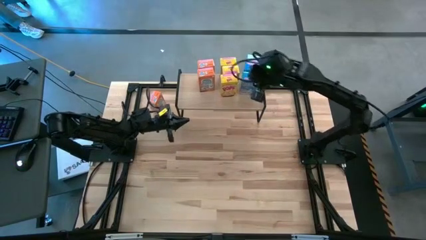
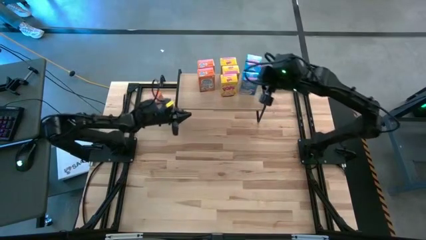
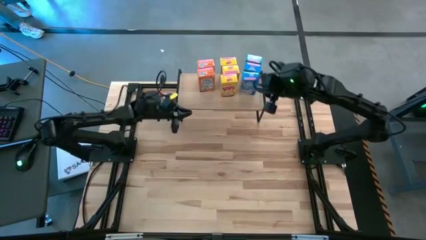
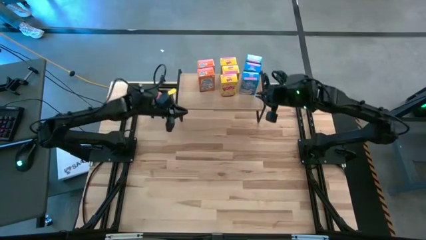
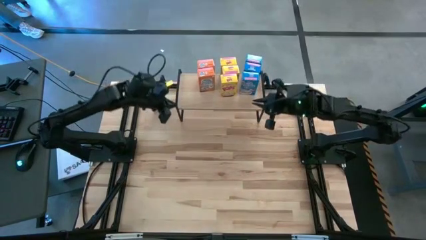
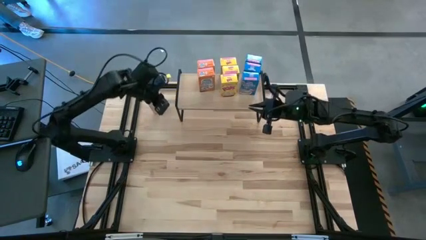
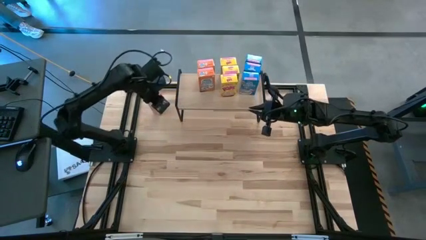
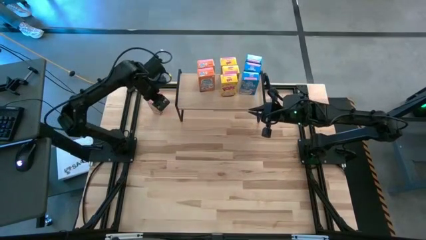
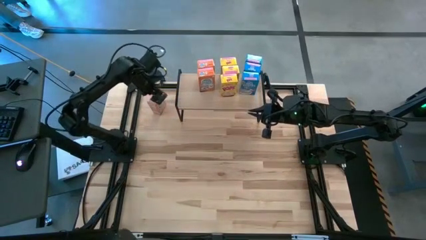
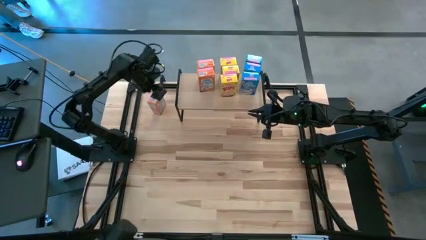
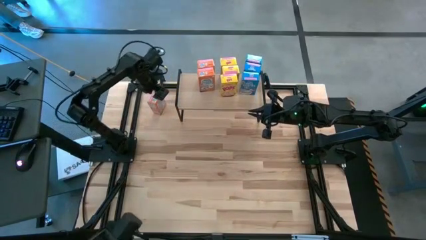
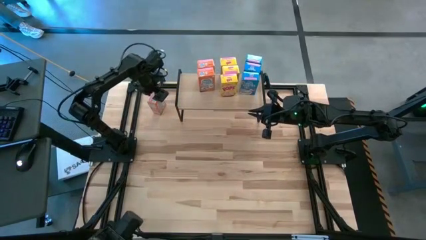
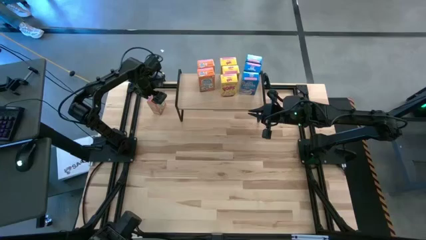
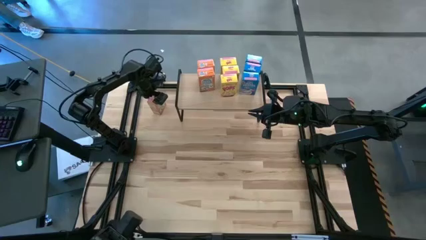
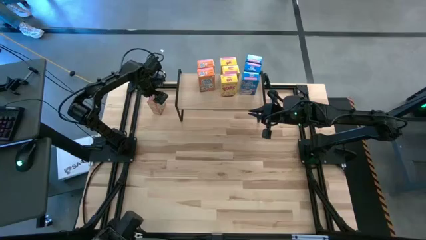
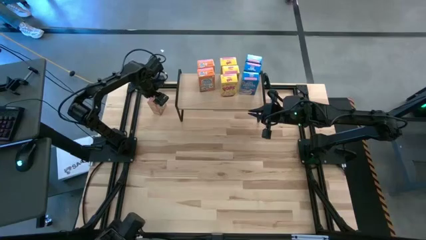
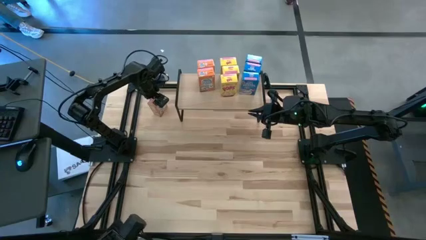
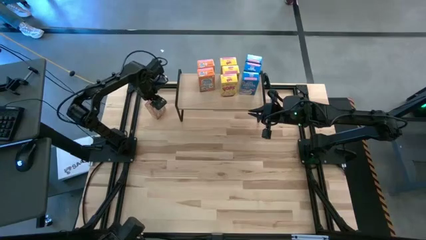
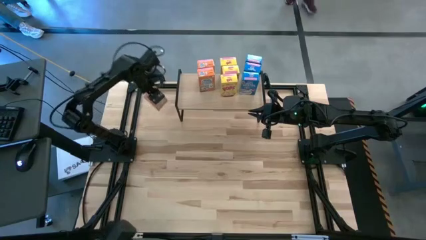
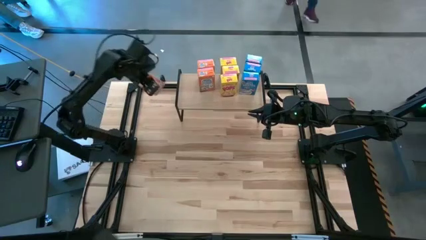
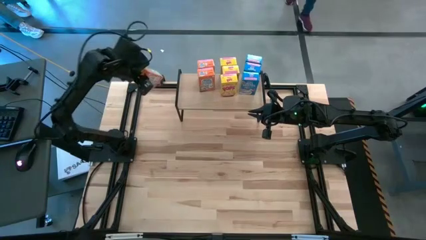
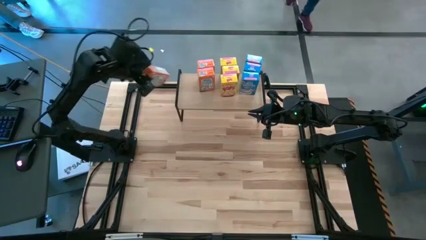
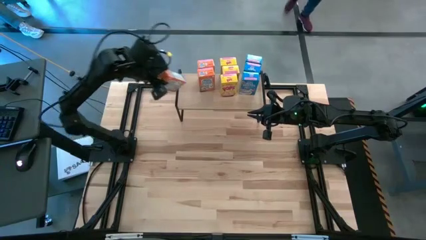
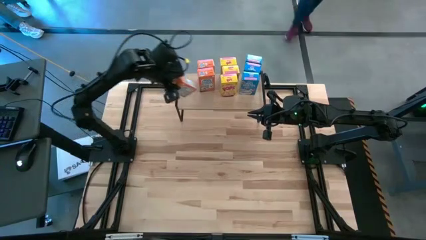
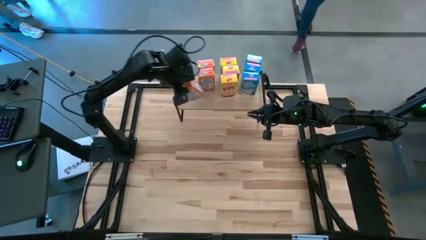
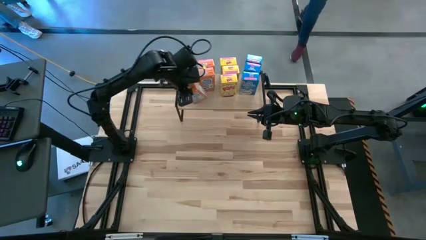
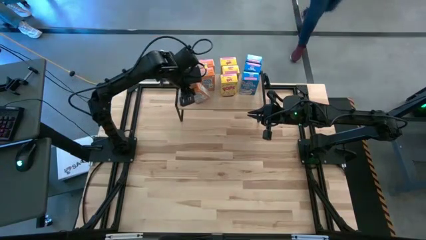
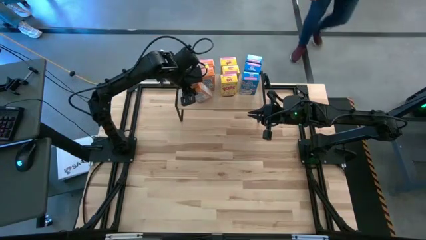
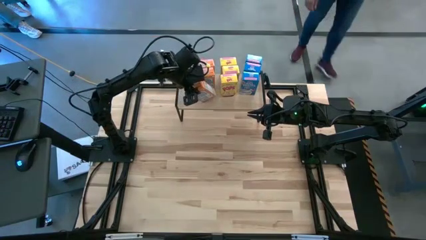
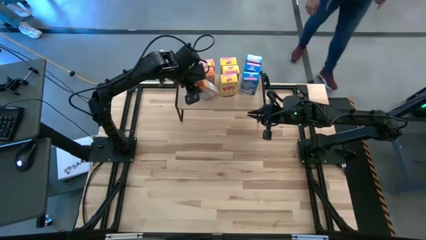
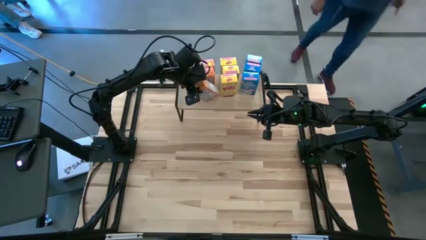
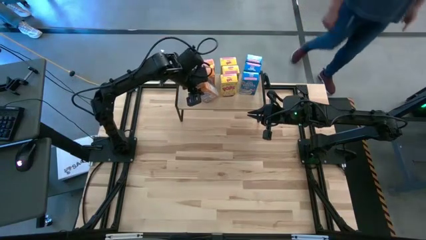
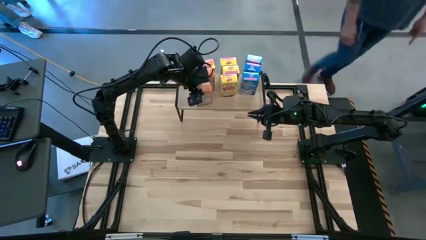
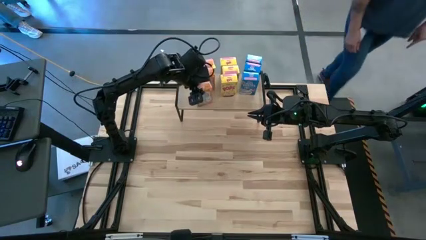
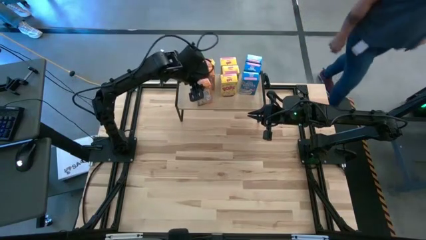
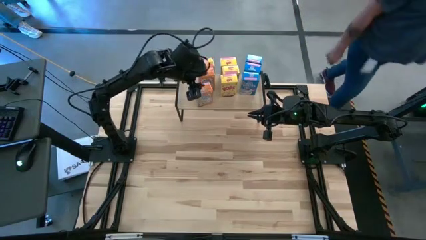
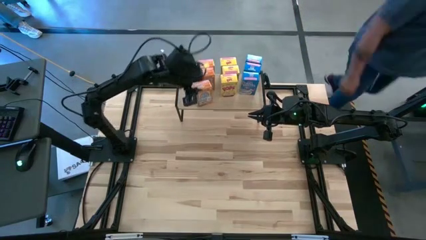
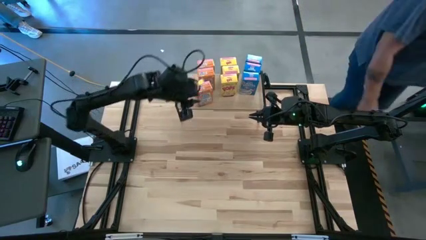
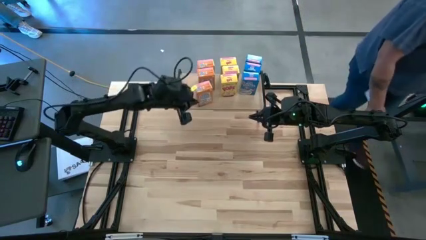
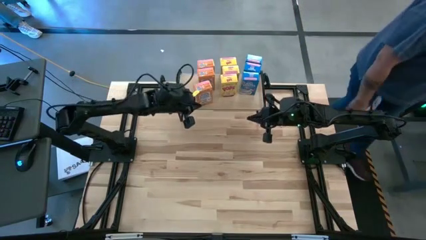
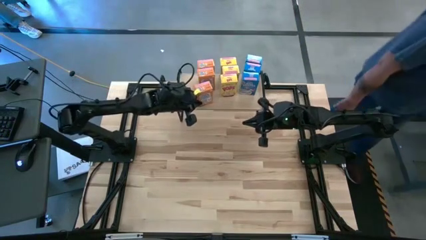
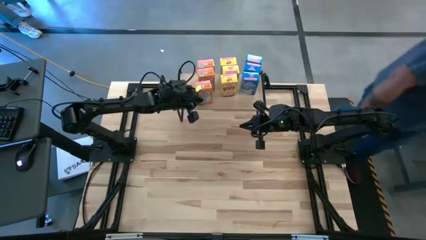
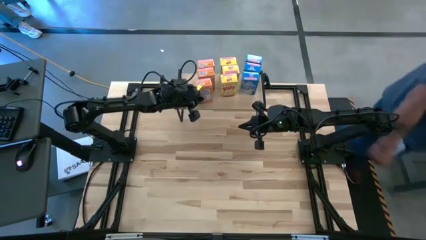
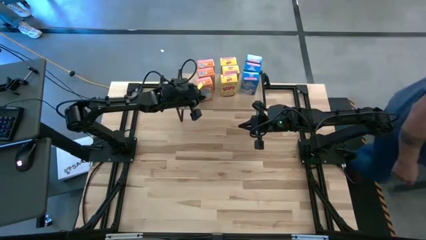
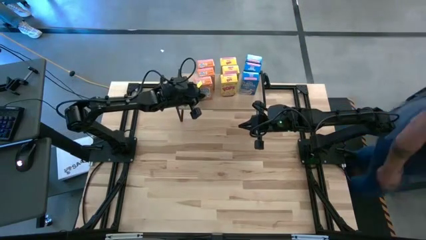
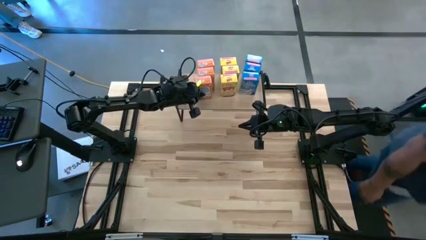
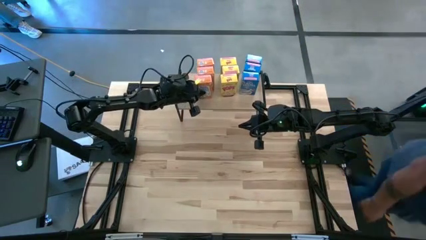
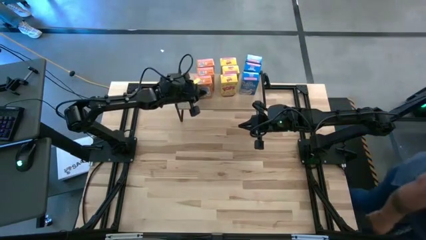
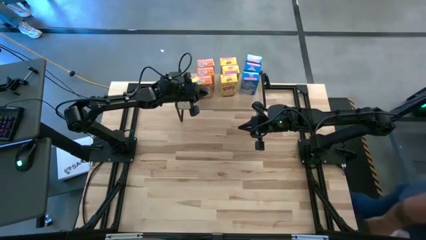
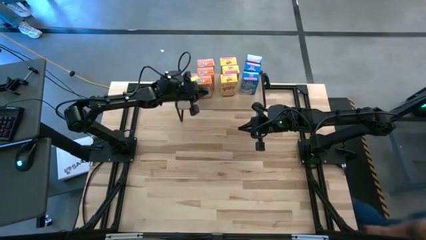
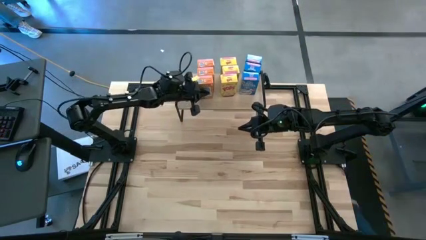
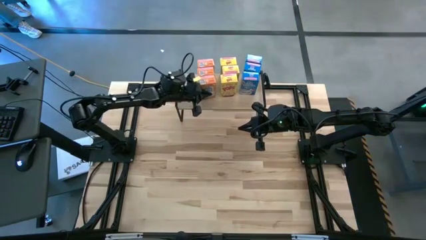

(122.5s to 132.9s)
Task: Stack cereal on shelf
Put the orange cereal box on the shelf aligned with the other orange cereal box

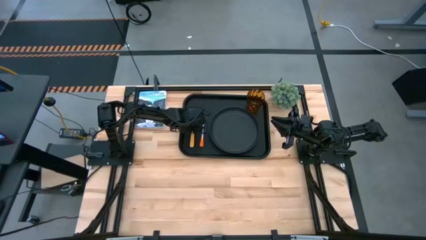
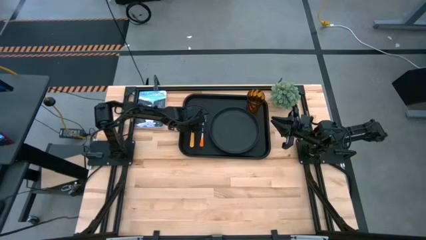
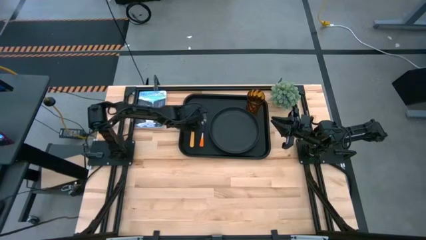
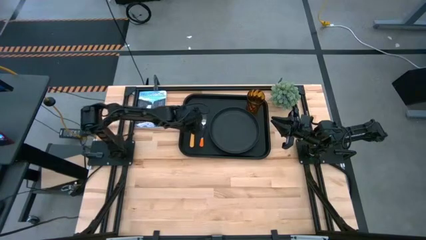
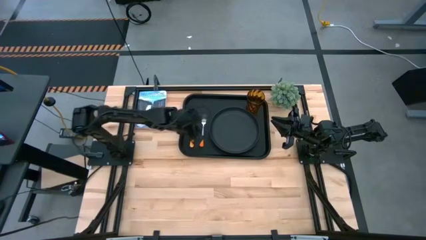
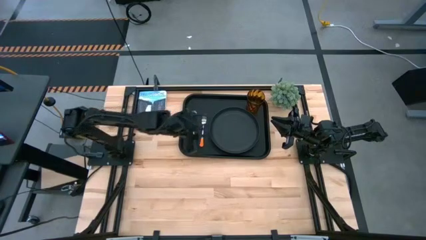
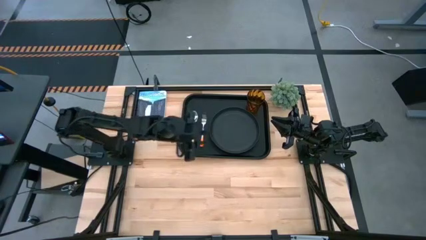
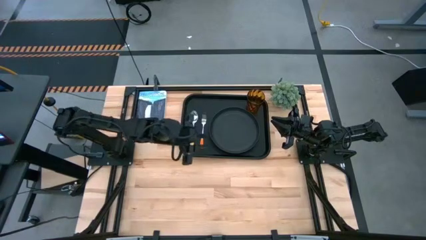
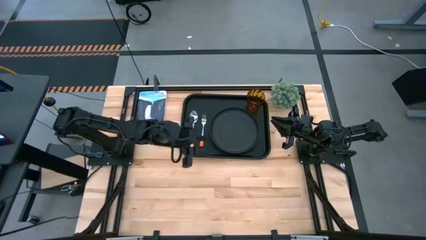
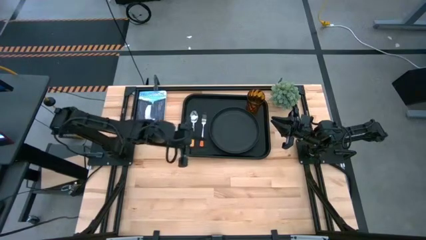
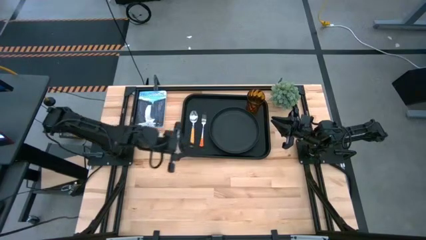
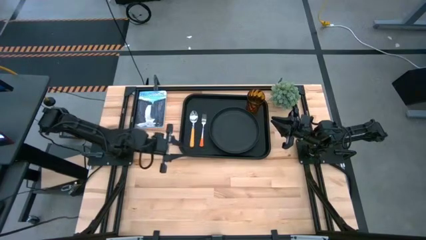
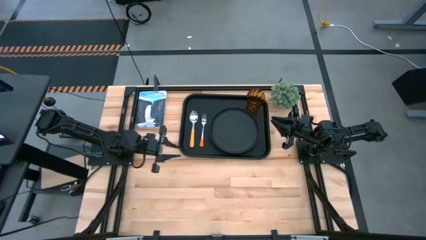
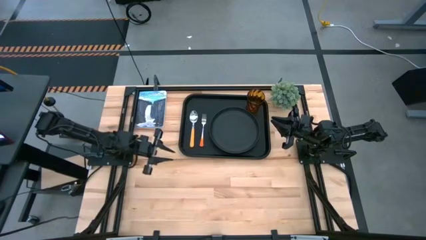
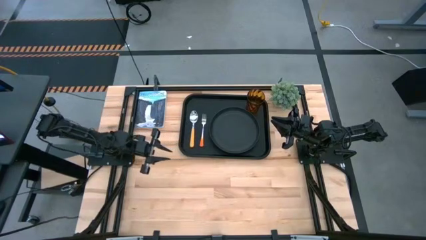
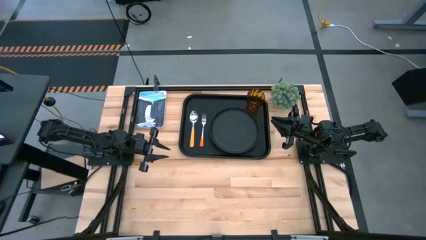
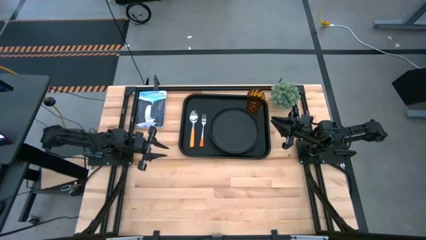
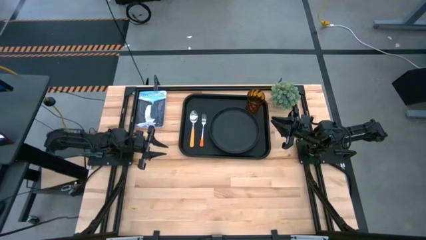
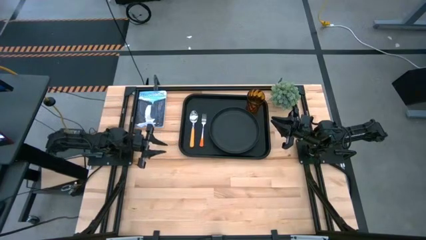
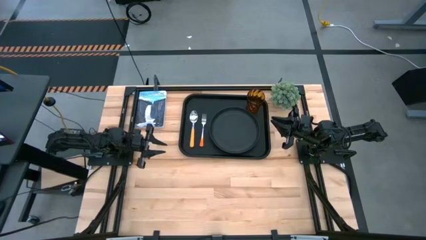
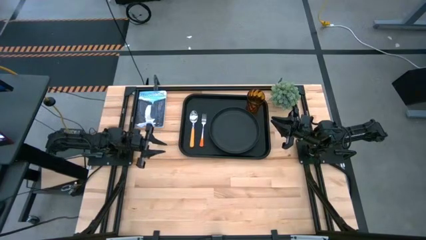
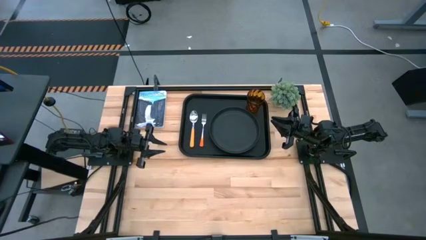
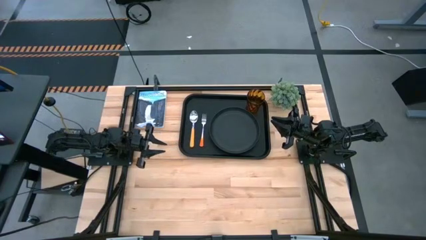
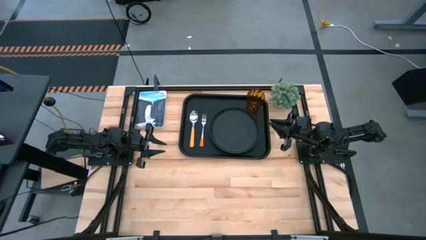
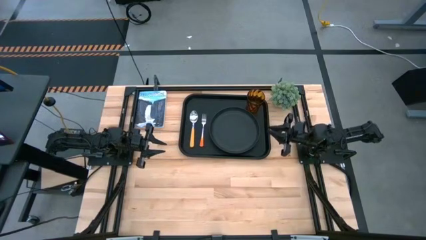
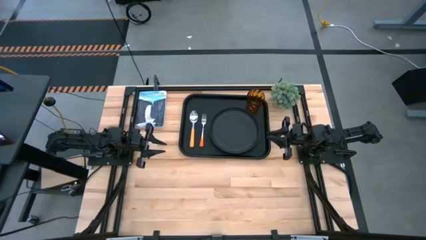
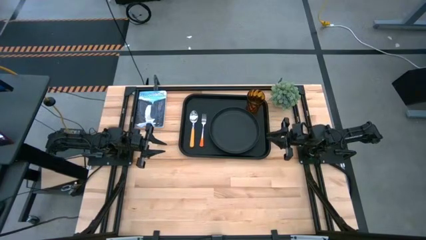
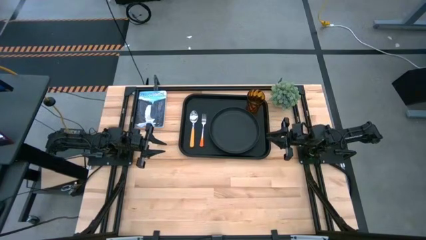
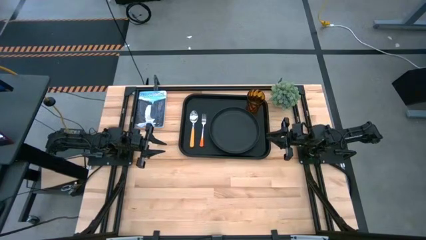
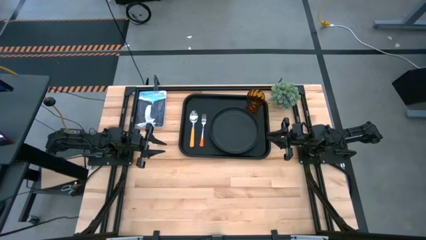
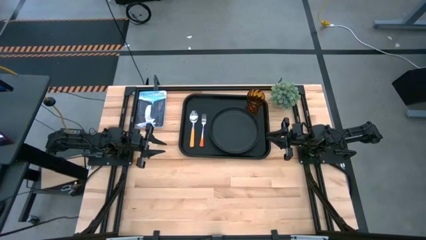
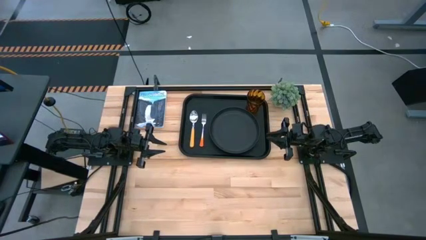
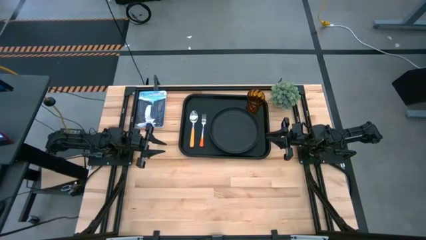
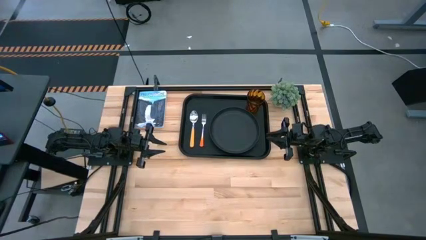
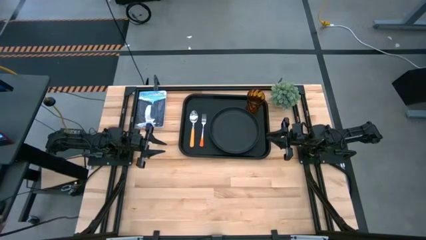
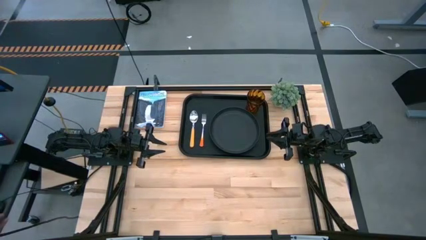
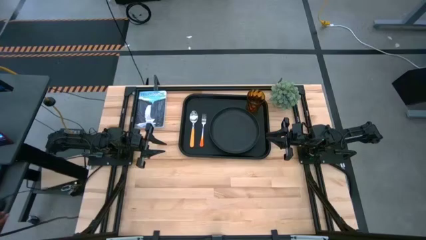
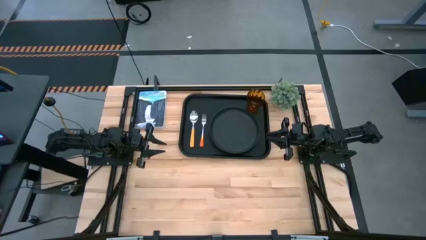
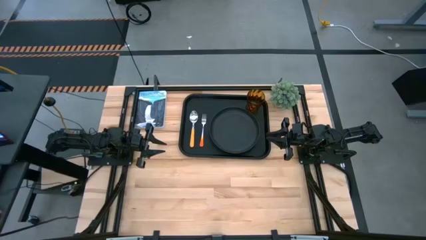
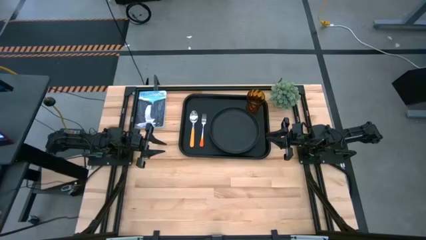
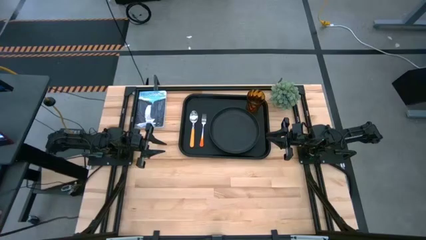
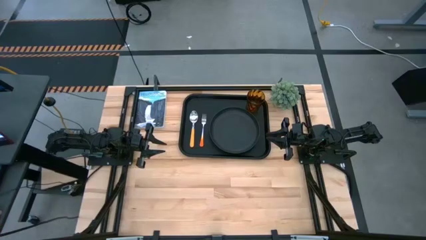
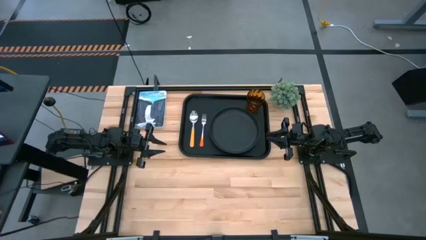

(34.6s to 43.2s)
Task: Pick and place plate/cup/fork/spoon on tray
Return to Home Position
